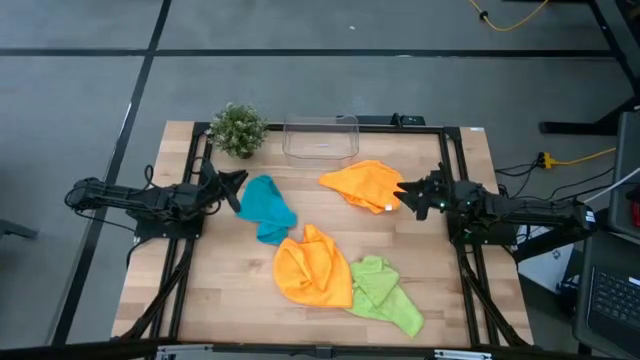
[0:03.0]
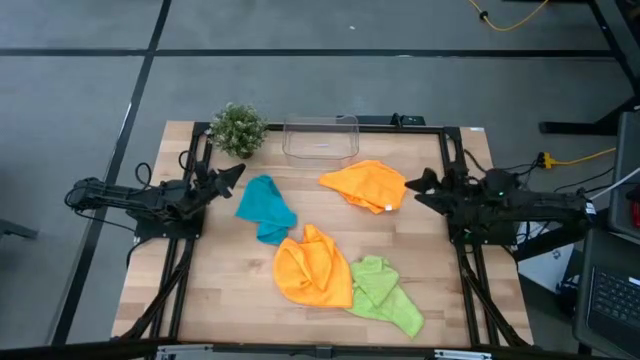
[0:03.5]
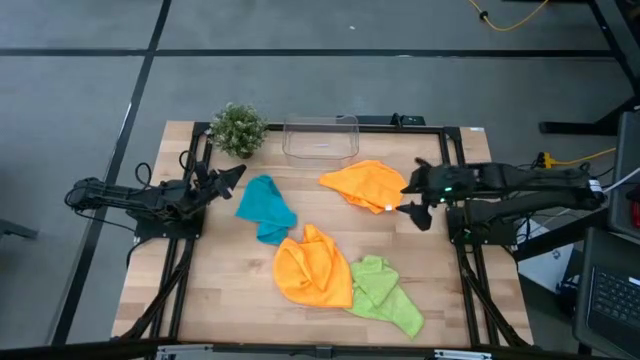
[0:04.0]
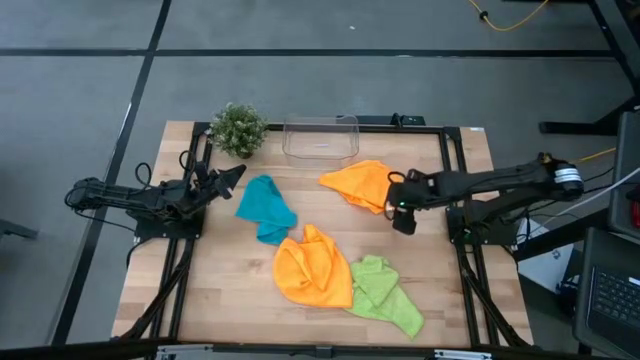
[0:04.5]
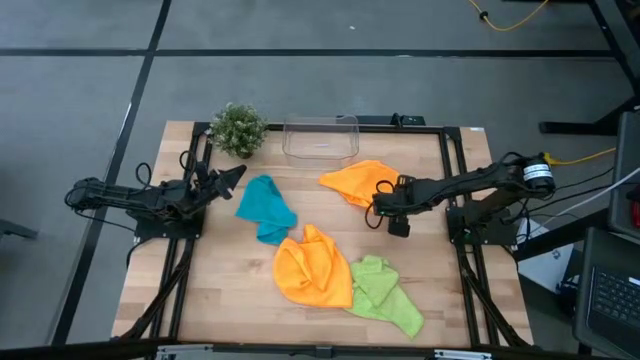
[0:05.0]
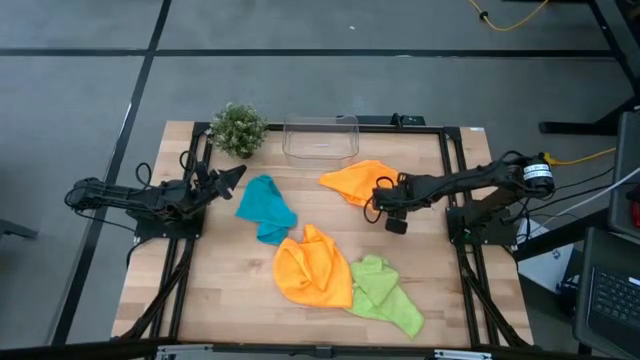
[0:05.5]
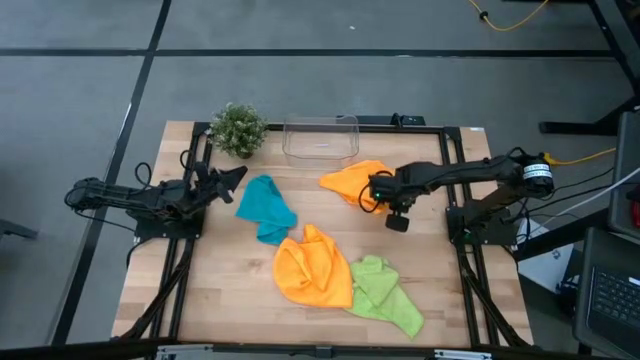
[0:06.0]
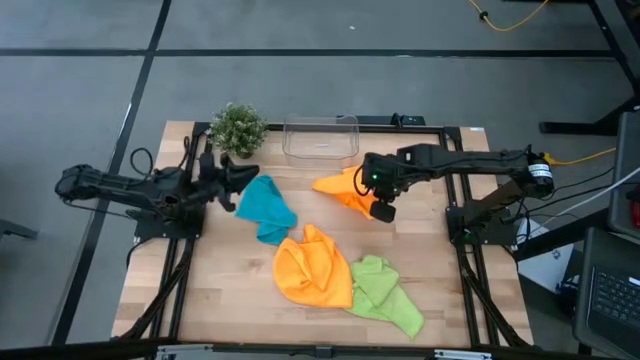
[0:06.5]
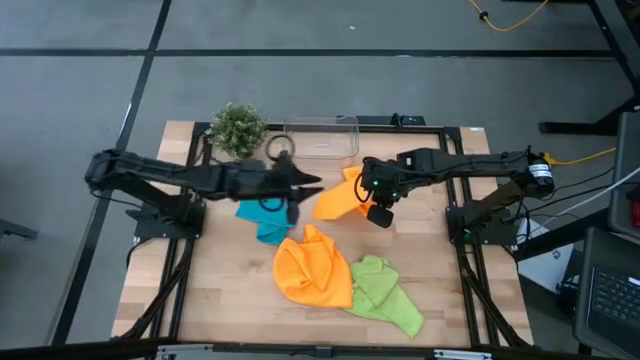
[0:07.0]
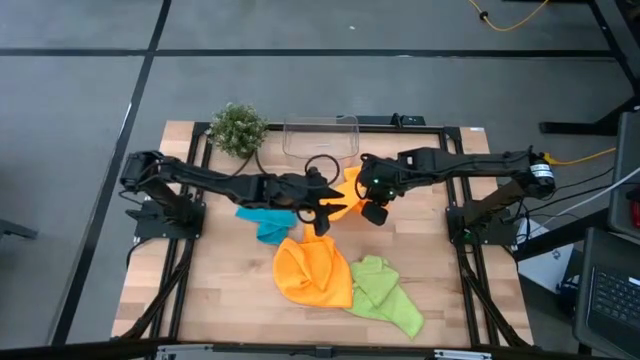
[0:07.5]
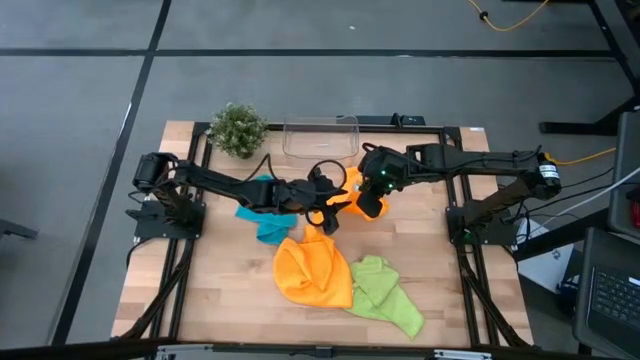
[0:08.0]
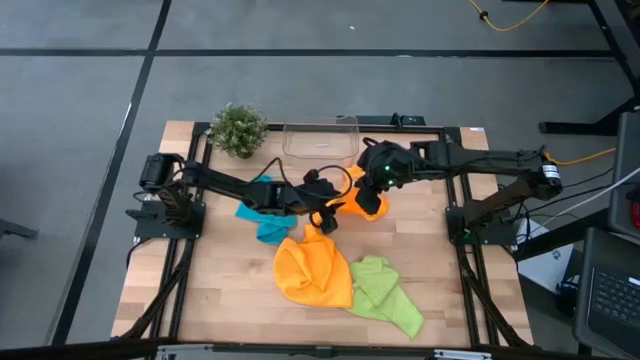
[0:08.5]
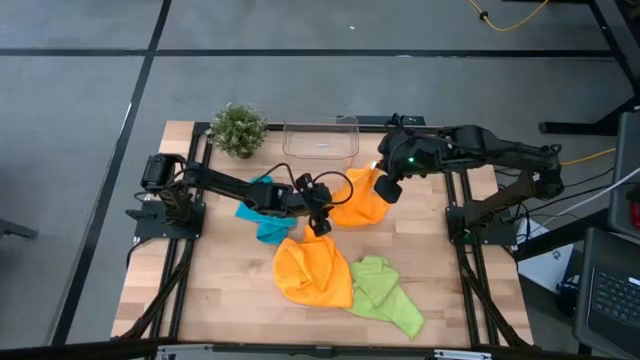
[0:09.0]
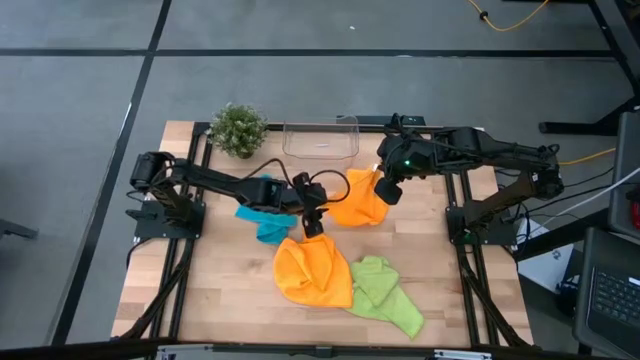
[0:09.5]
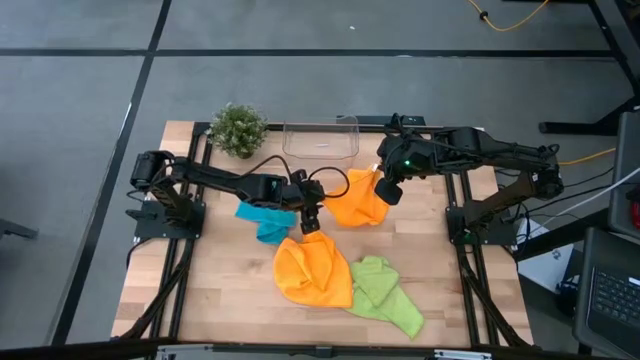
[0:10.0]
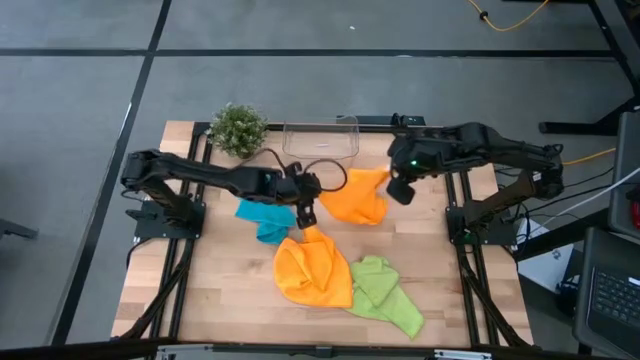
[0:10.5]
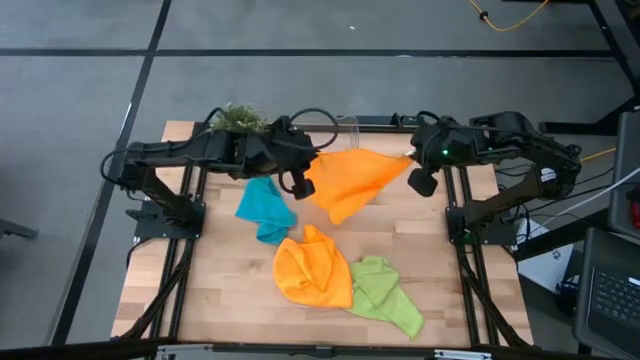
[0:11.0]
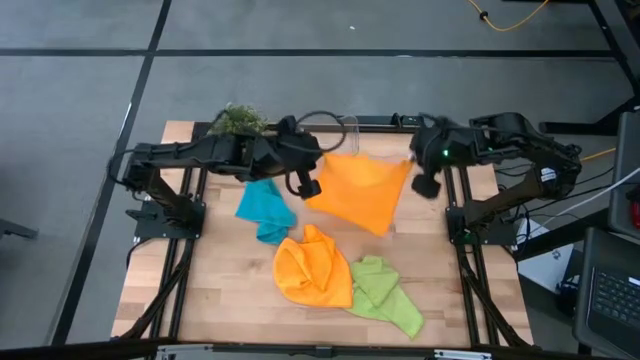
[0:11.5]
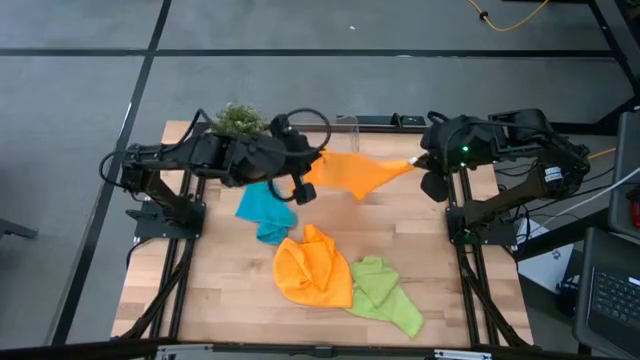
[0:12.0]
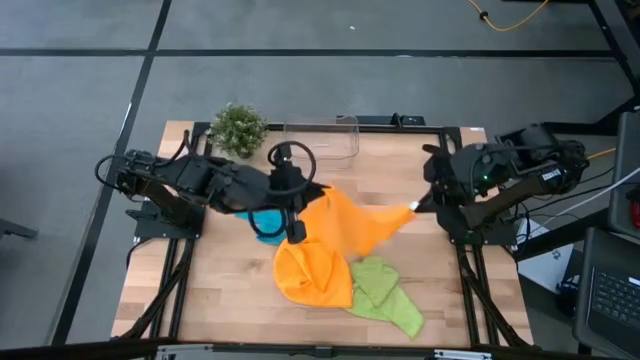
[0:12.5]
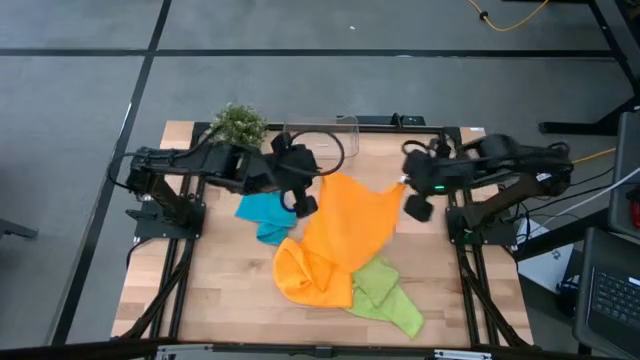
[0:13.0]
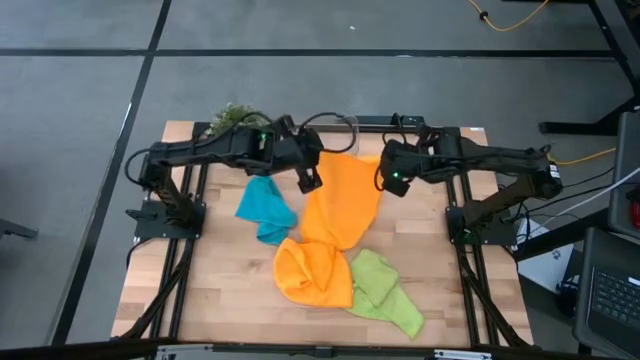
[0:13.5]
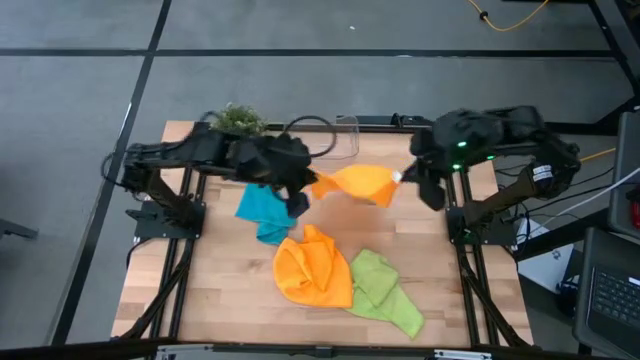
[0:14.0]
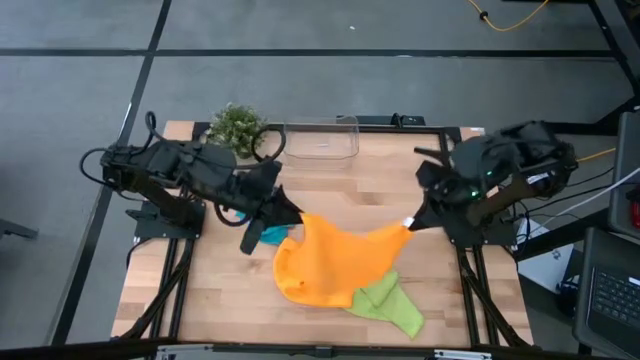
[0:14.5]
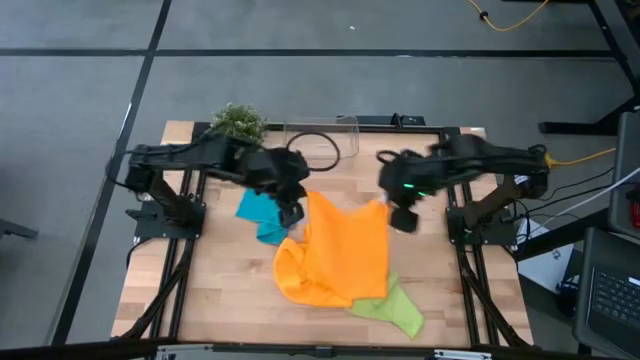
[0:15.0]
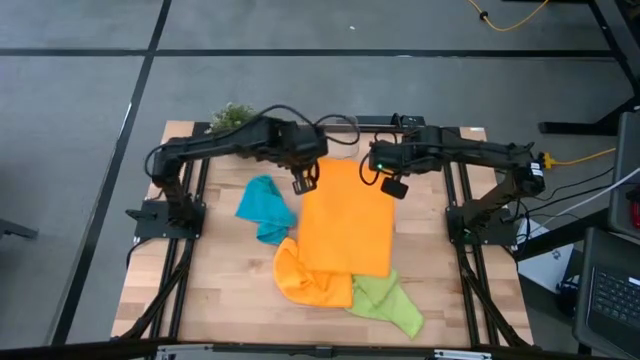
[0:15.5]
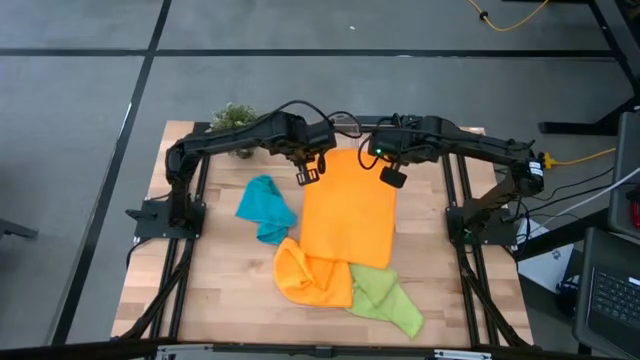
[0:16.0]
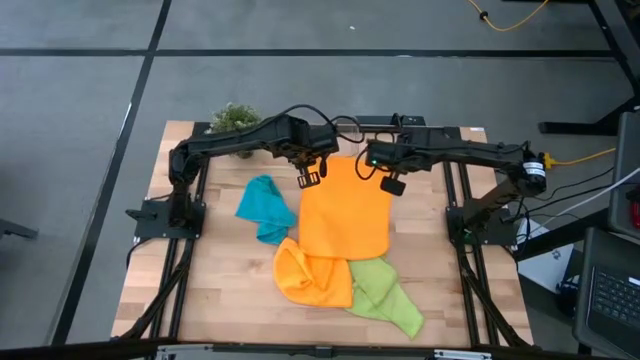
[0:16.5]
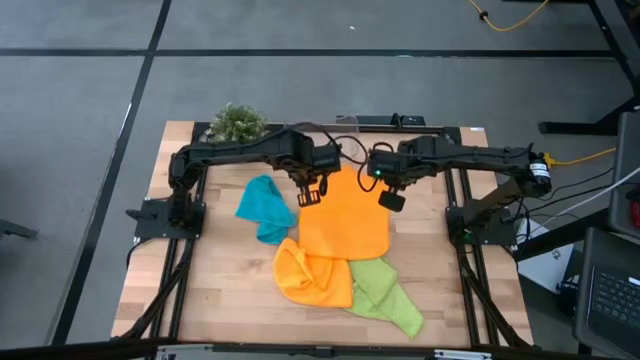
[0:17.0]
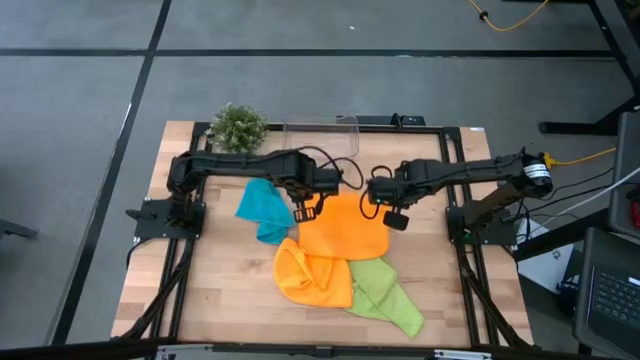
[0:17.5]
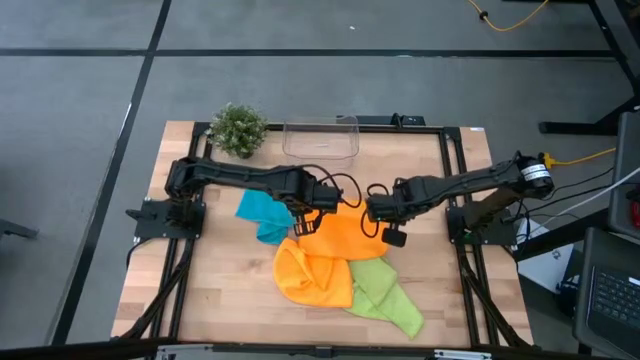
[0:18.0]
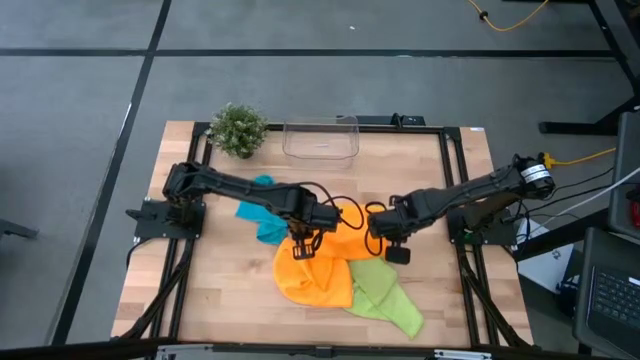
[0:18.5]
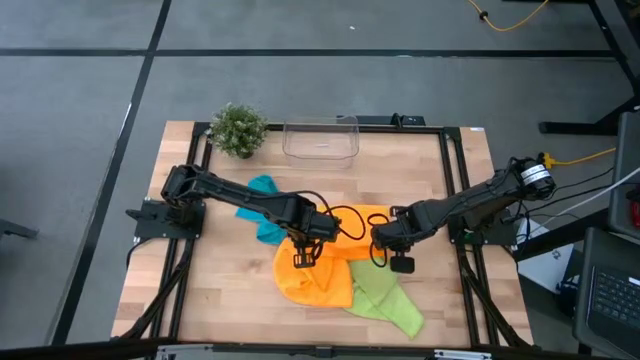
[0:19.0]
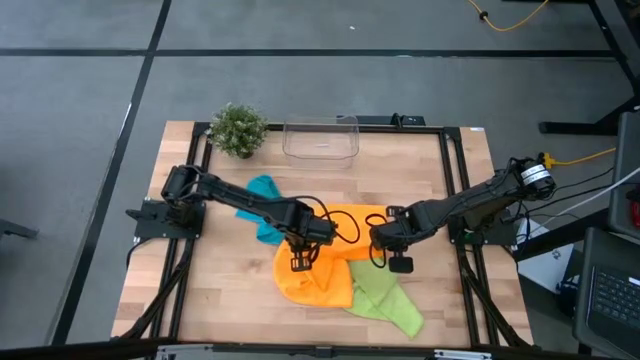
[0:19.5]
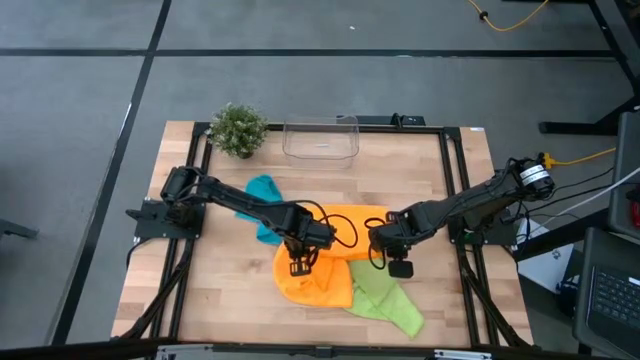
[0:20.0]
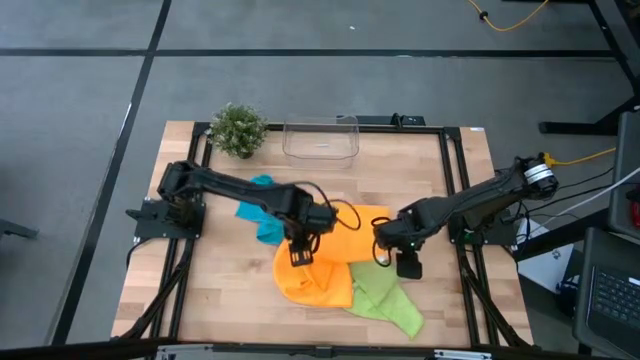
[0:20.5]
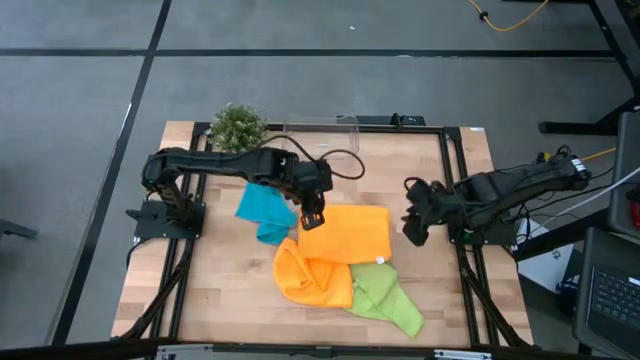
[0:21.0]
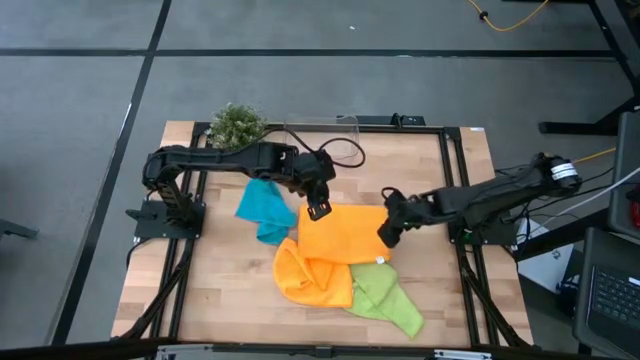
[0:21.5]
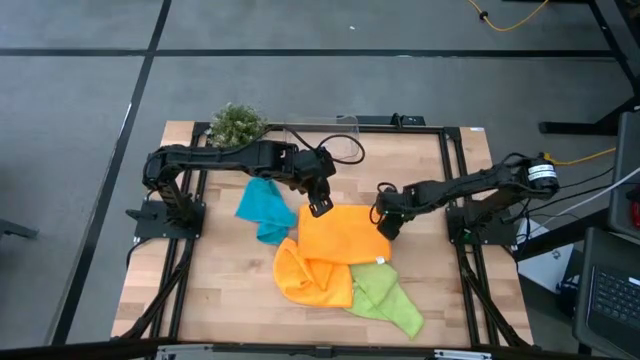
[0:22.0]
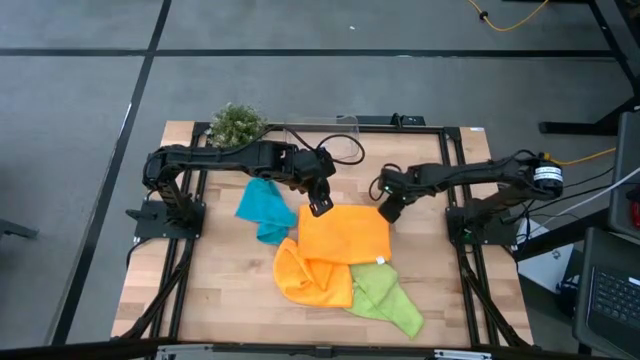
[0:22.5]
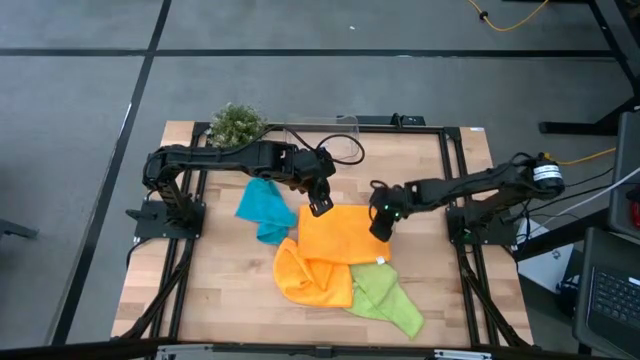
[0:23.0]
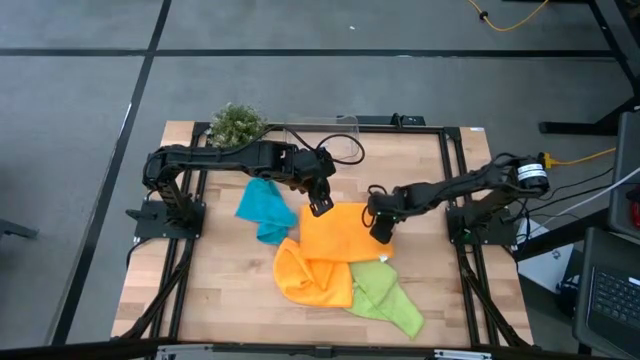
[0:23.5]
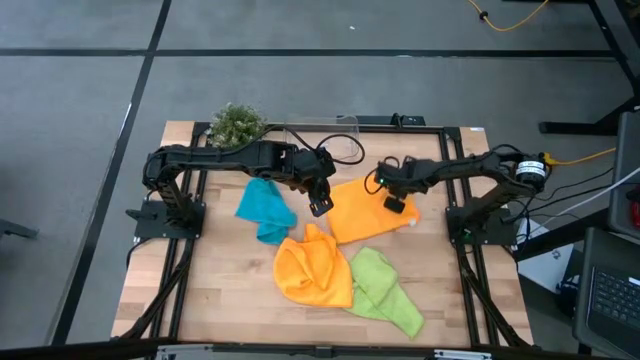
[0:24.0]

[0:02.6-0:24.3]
Task: Fold microfiber towels
Fold the top orange microfiber cloth
